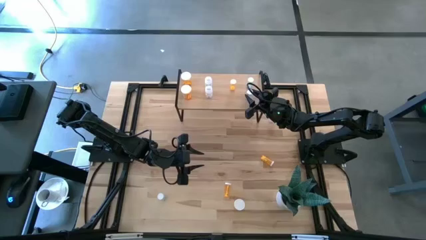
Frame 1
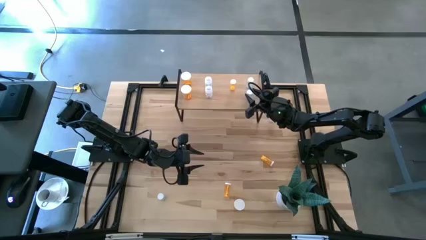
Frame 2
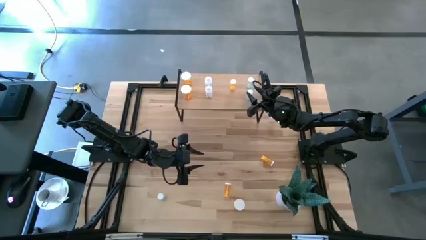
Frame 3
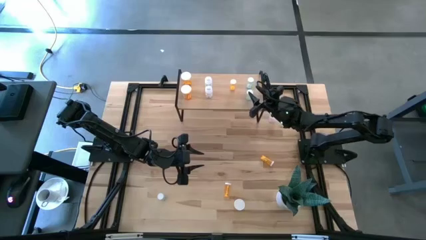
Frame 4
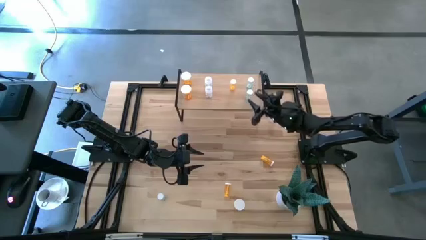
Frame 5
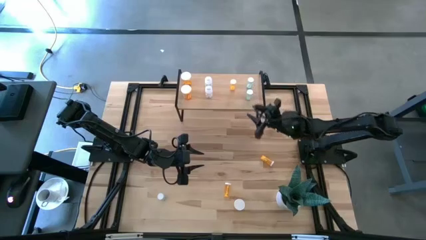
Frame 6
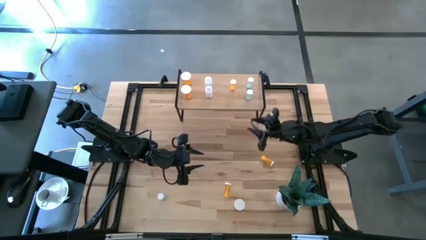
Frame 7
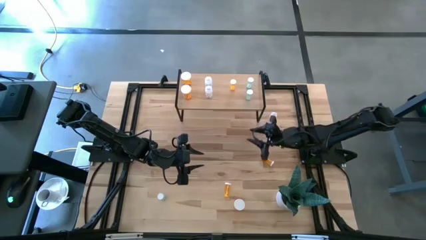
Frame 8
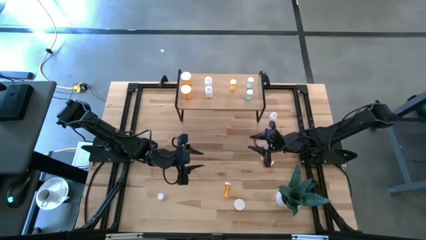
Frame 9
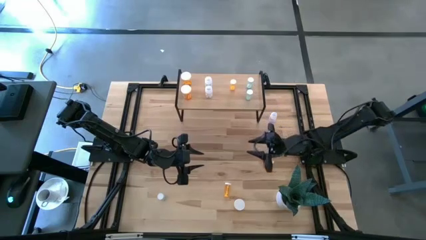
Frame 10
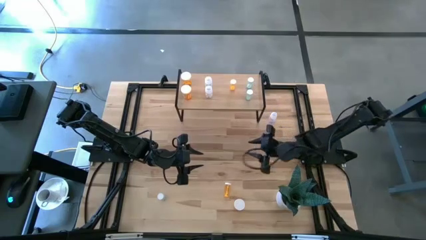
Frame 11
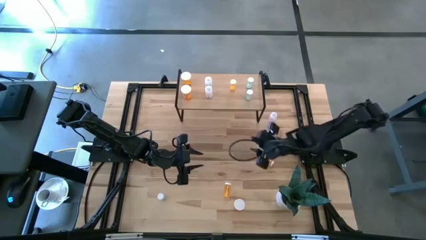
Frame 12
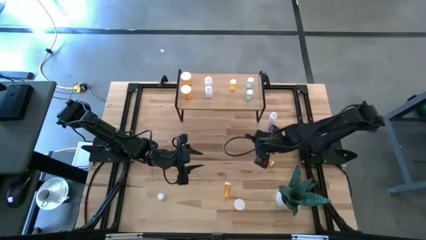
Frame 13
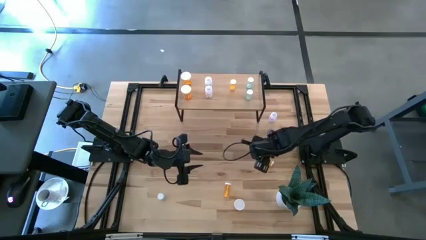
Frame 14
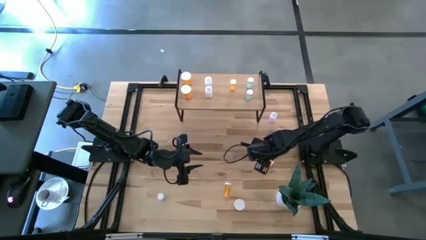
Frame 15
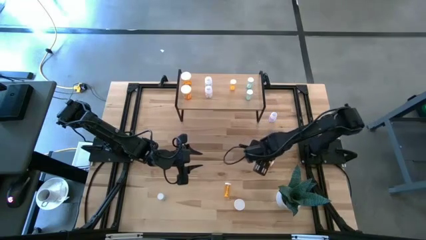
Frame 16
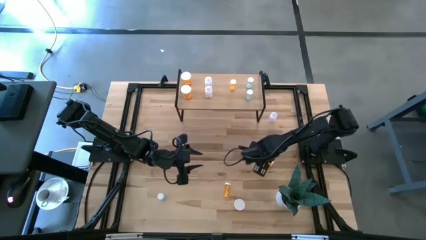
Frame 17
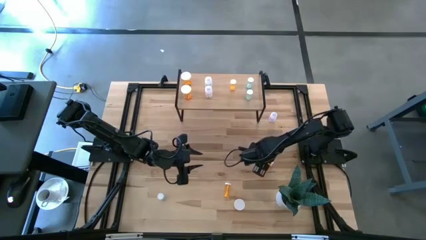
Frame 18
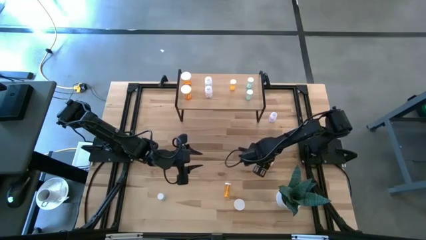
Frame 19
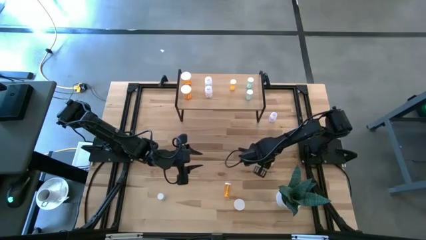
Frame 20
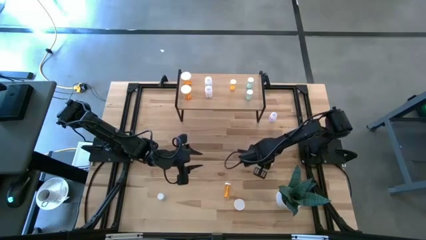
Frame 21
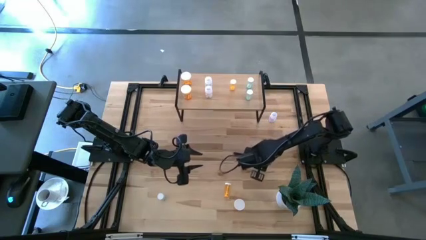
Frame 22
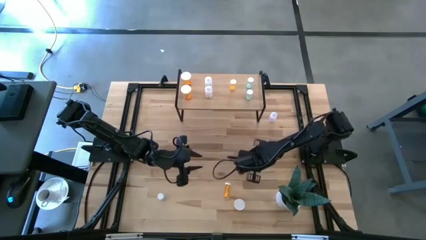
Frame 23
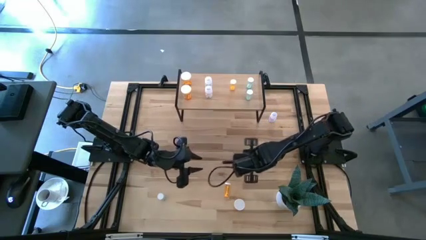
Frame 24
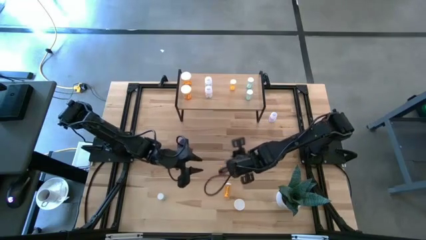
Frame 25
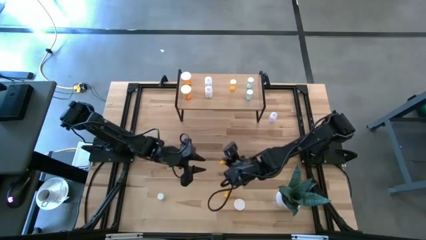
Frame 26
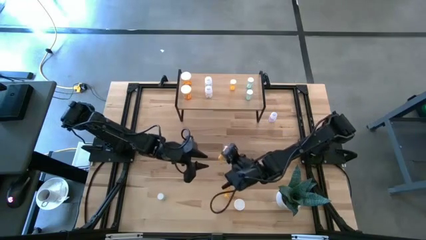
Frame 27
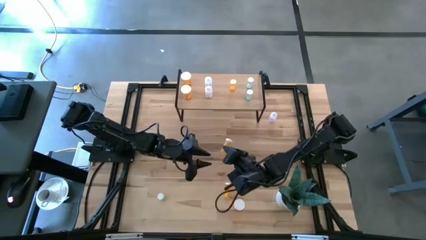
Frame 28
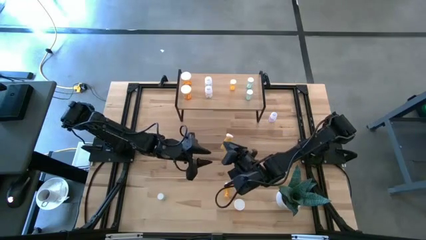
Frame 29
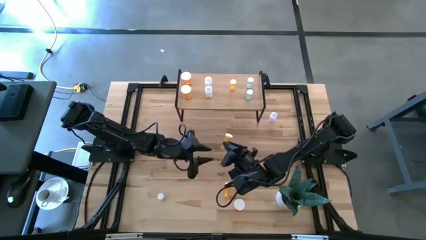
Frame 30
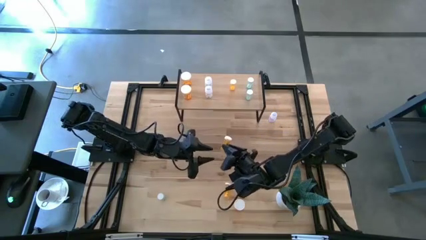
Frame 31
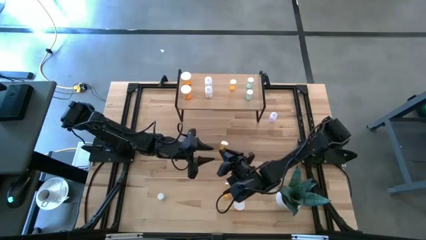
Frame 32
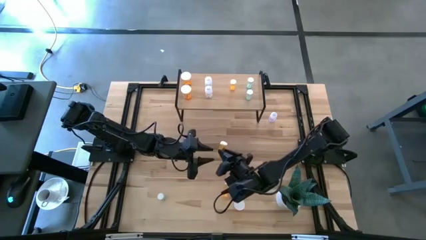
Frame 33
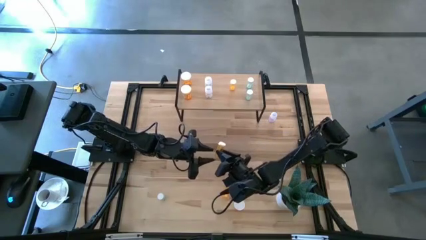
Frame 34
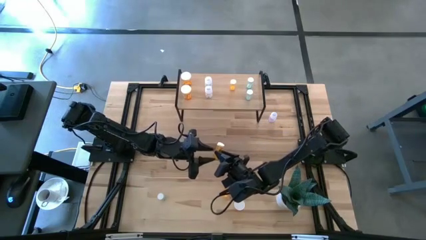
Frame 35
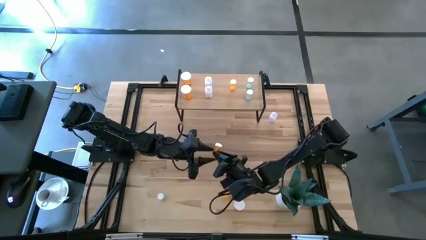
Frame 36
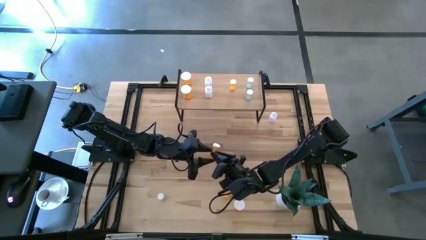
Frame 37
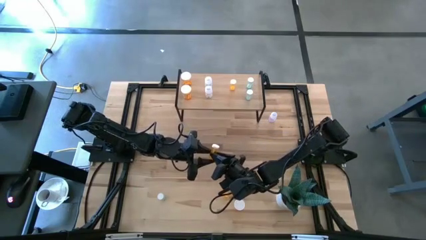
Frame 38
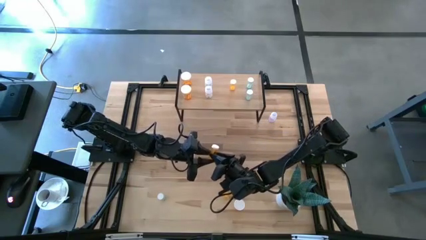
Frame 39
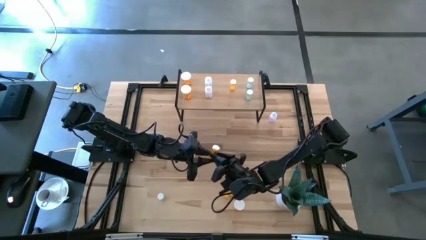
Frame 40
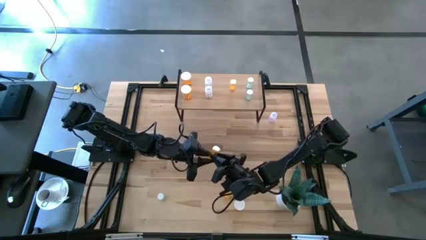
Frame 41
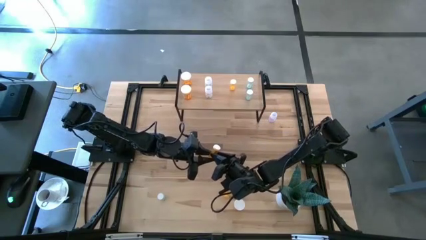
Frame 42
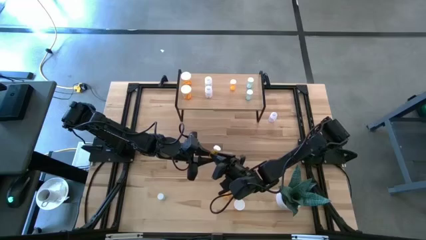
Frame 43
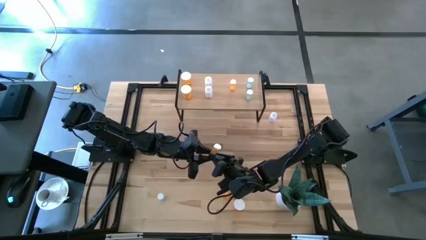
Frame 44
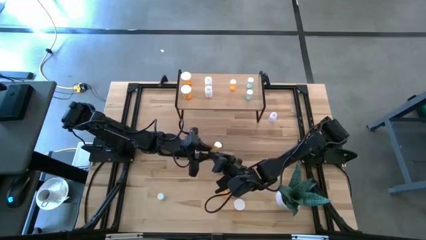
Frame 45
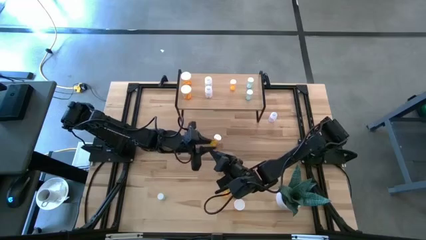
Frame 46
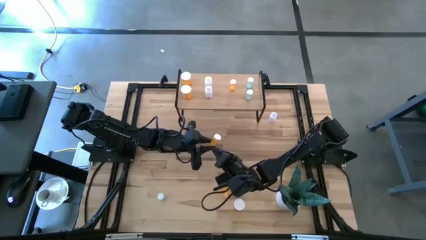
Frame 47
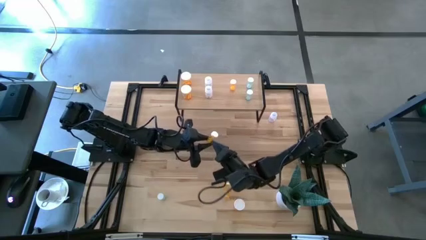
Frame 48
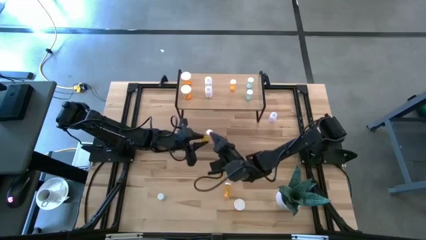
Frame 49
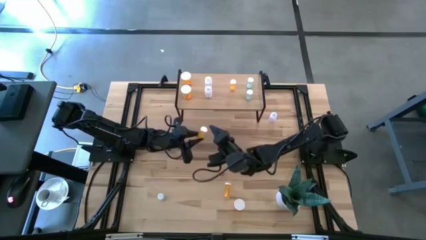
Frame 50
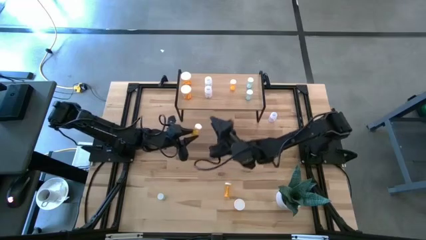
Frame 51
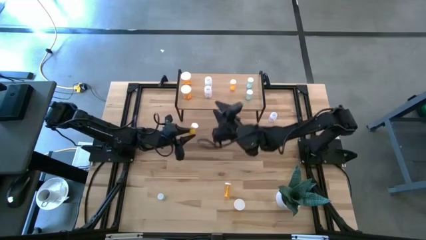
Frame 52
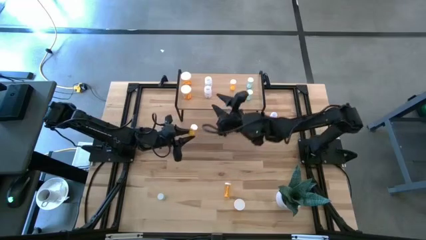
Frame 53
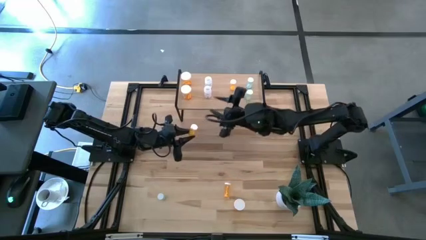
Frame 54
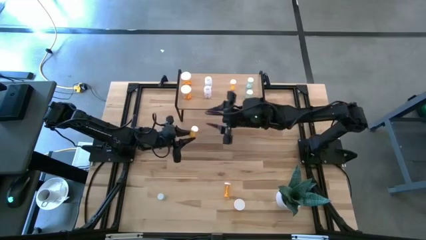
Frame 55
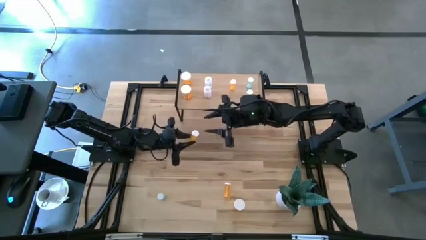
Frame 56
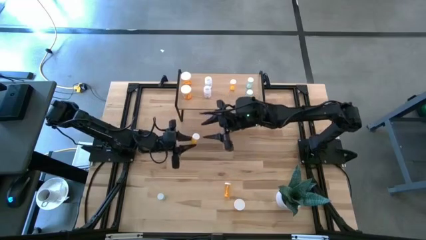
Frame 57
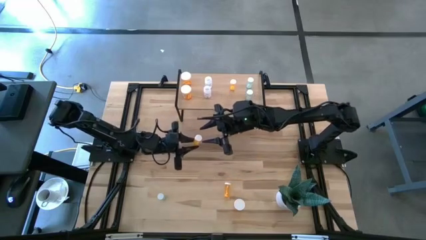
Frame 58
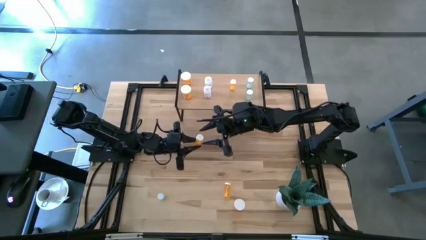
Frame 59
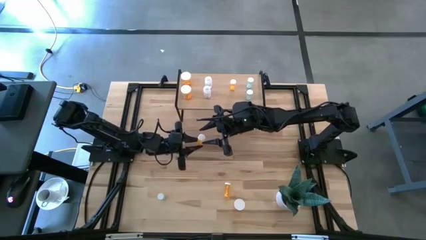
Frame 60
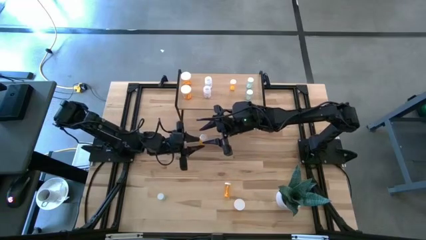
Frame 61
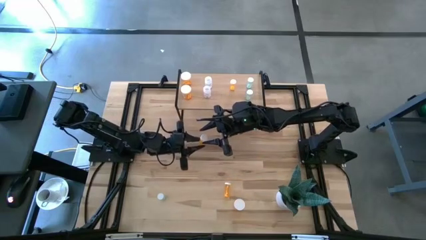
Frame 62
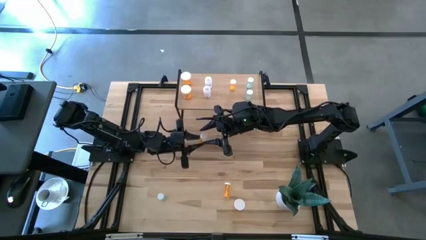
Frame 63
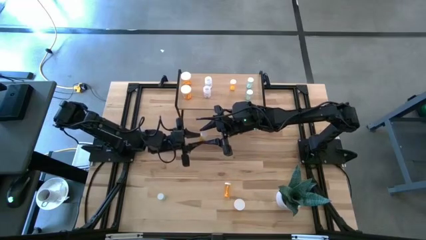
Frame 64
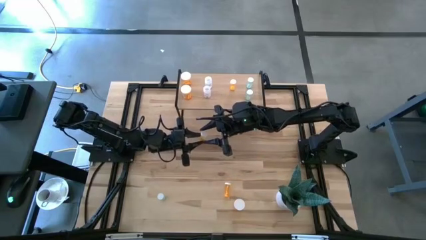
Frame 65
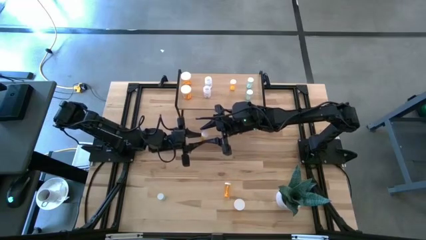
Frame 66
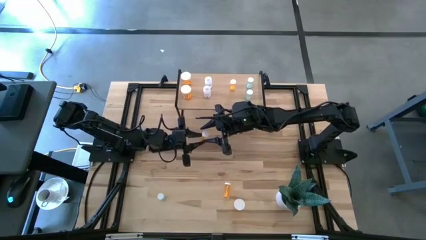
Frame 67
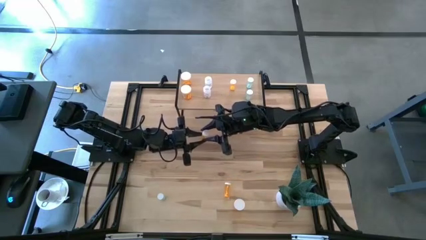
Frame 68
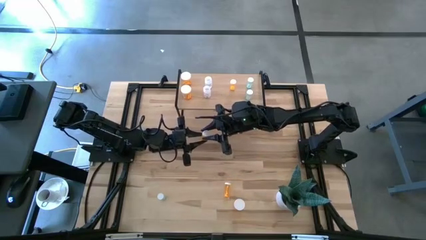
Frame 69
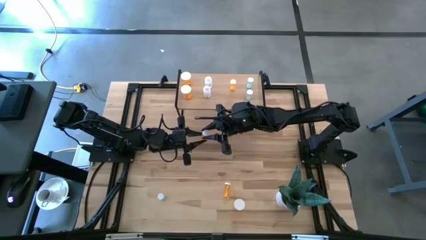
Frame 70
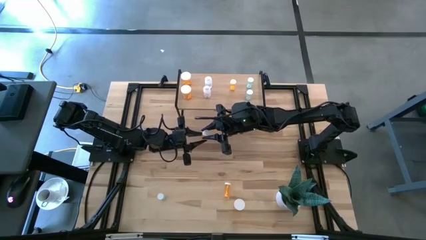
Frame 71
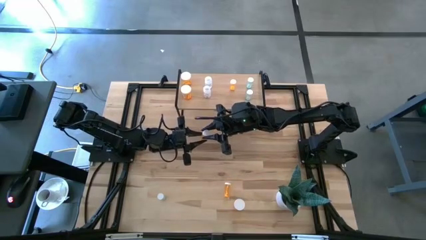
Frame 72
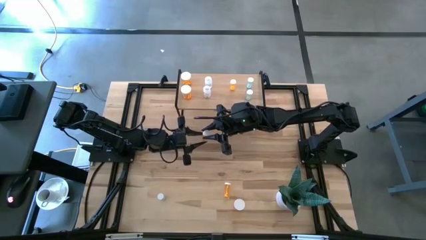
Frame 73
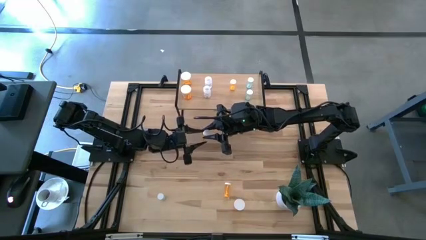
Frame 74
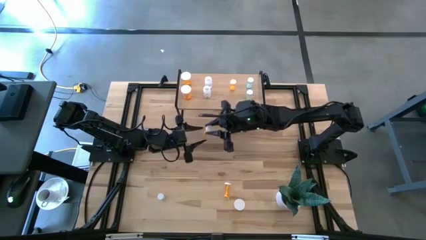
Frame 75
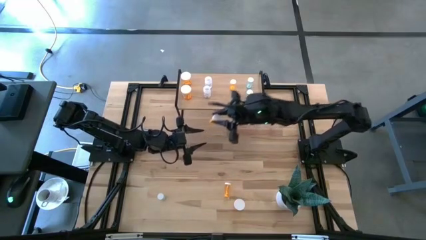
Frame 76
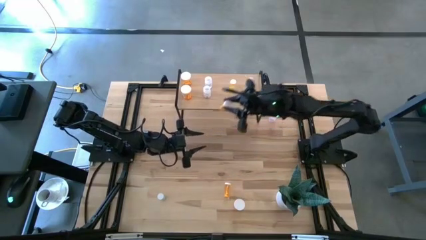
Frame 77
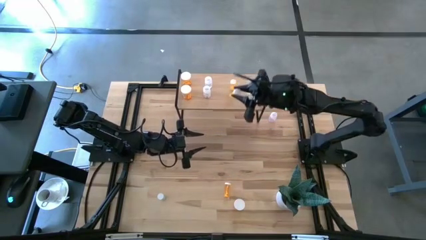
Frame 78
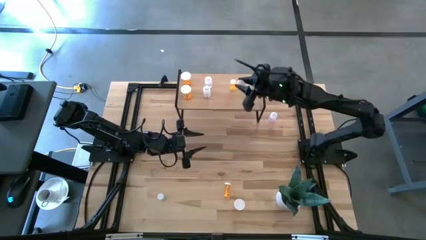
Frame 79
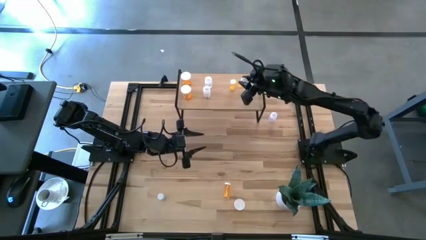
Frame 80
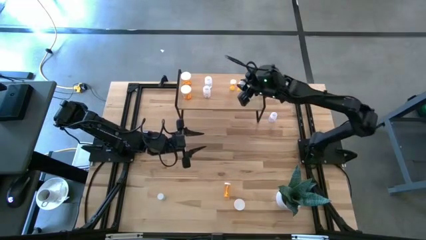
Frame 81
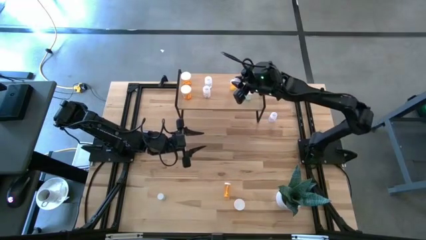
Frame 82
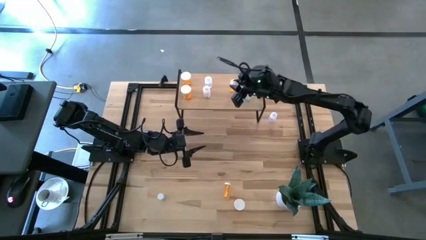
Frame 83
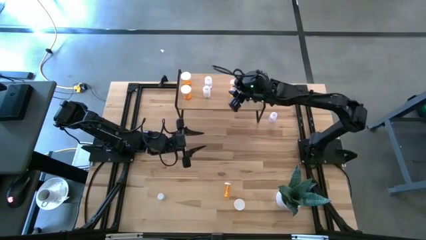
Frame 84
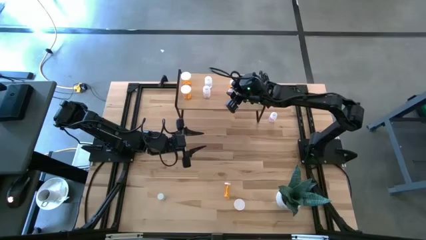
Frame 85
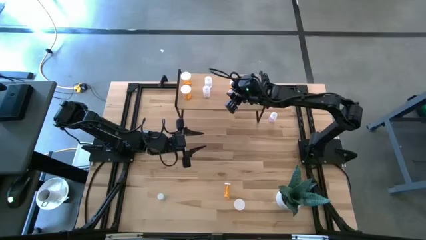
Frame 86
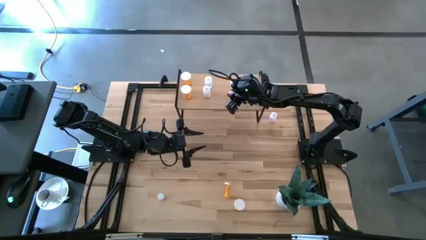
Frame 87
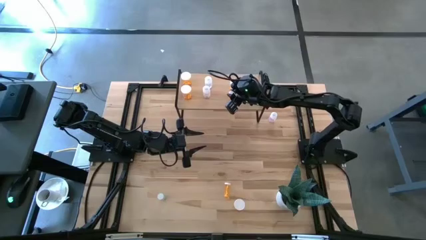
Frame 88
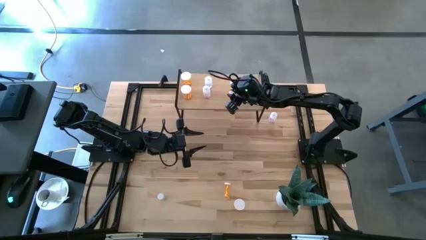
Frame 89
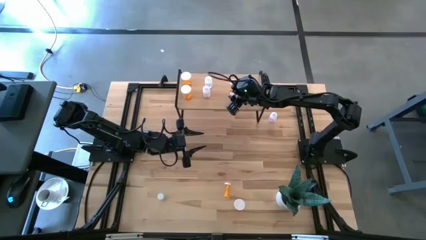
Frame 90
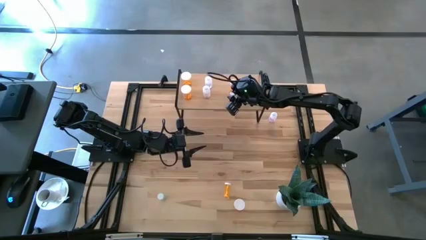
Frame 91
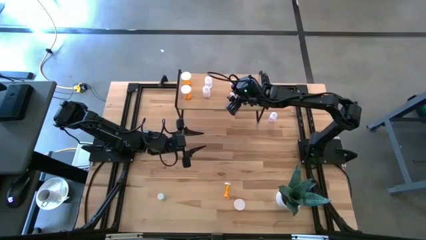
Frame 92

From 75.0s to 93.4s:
Task: Pick and place medicine bottles onto shelf by color
Put the top center small orange pill bottle on the shelf aligned with the other small orange pill bottle
